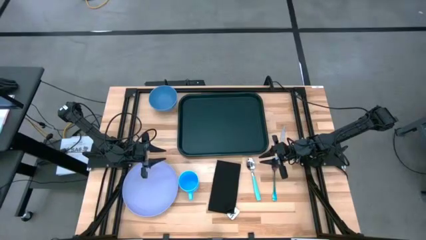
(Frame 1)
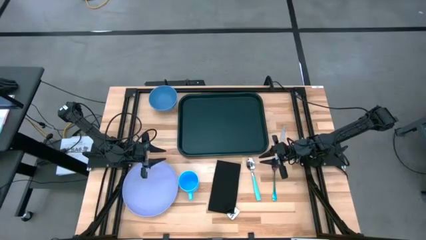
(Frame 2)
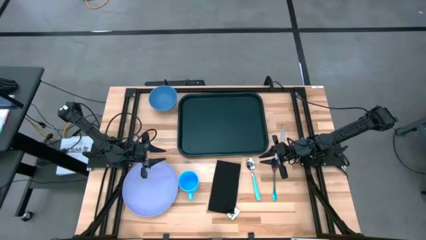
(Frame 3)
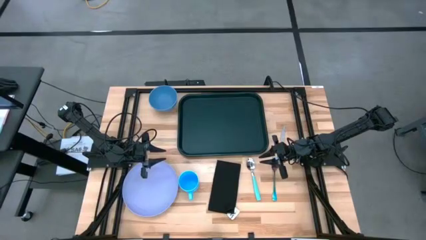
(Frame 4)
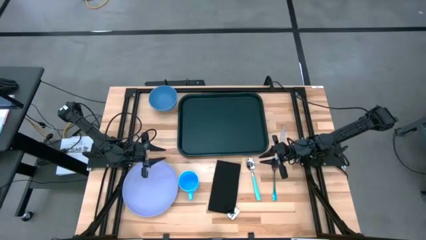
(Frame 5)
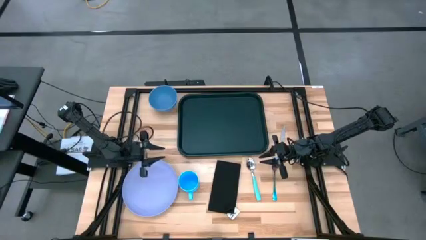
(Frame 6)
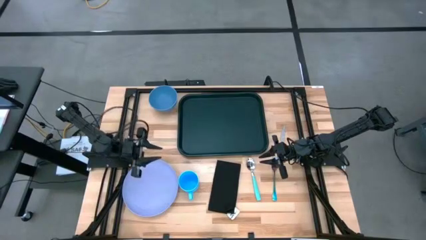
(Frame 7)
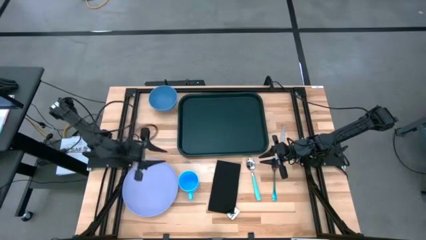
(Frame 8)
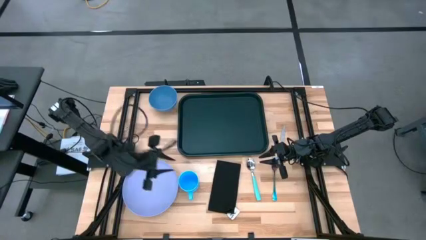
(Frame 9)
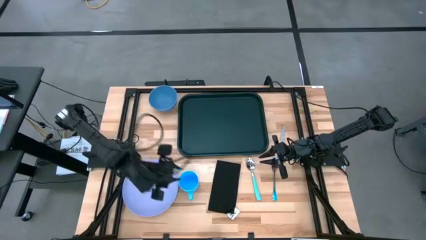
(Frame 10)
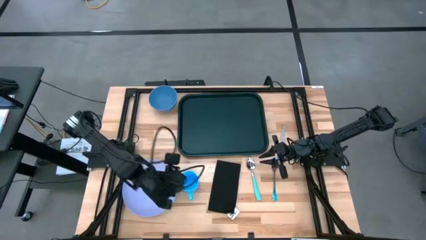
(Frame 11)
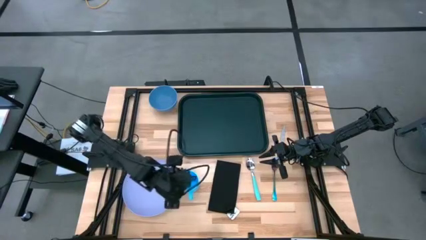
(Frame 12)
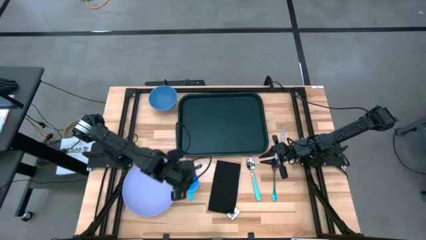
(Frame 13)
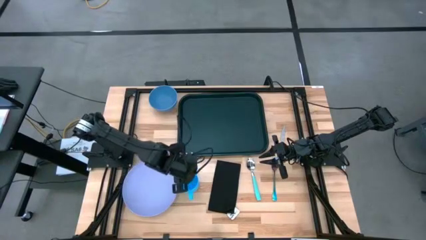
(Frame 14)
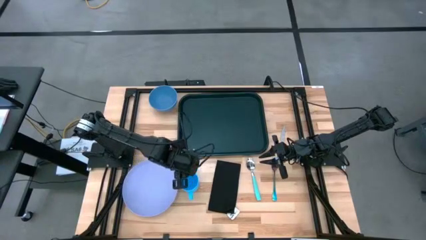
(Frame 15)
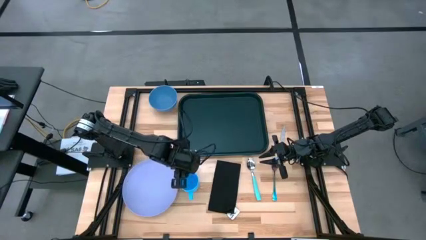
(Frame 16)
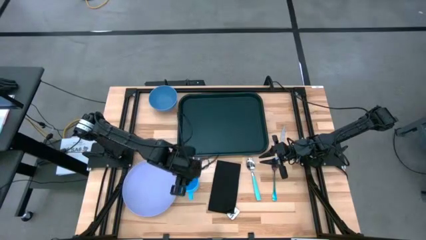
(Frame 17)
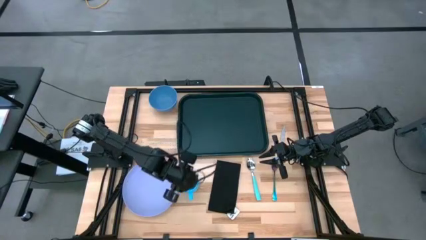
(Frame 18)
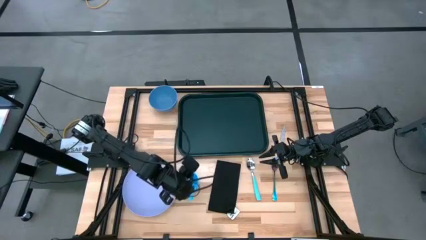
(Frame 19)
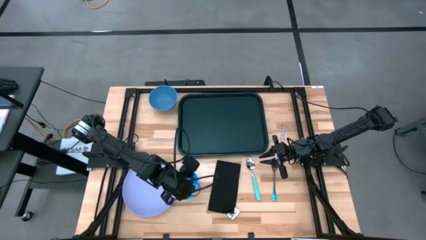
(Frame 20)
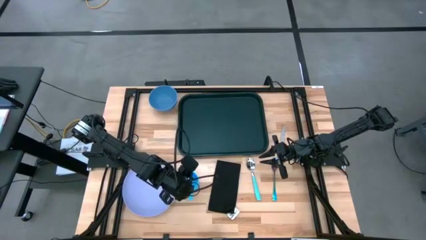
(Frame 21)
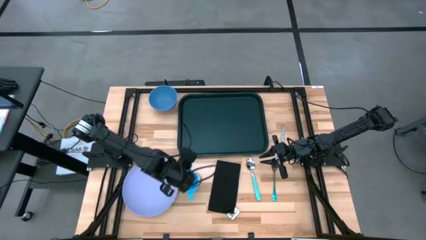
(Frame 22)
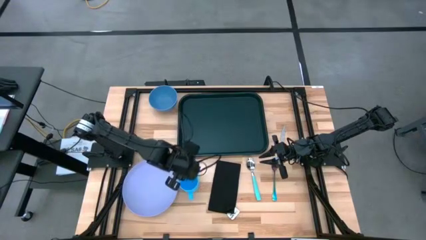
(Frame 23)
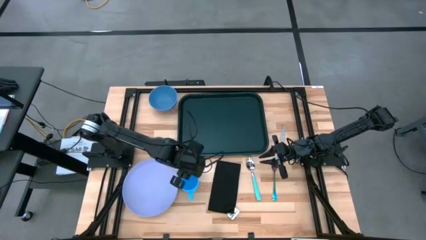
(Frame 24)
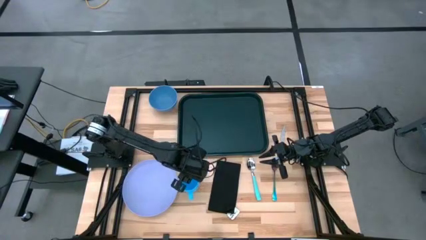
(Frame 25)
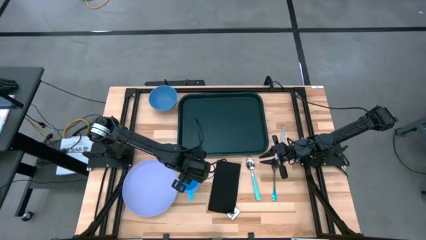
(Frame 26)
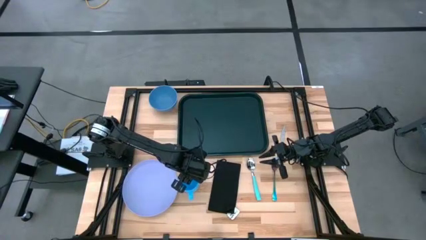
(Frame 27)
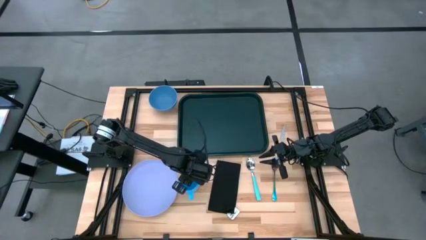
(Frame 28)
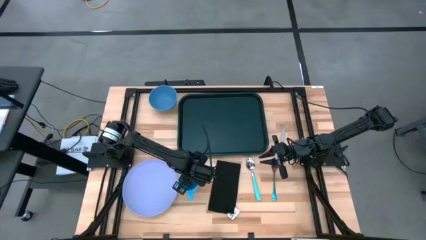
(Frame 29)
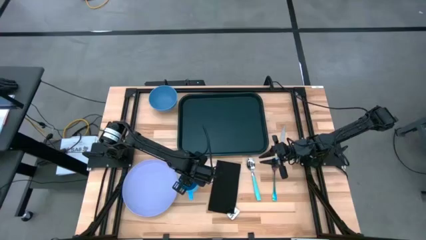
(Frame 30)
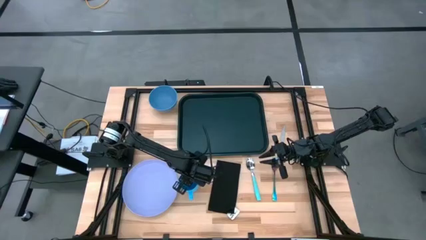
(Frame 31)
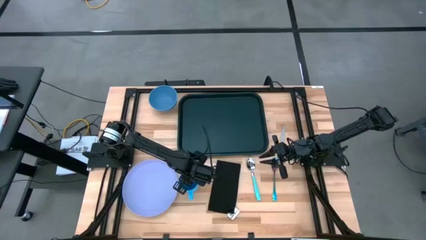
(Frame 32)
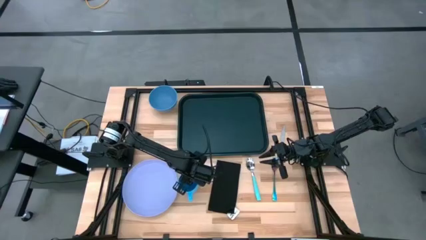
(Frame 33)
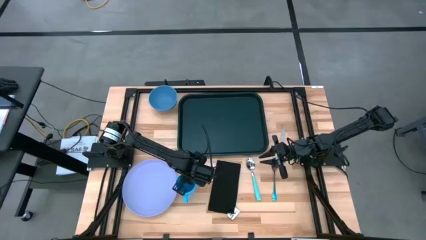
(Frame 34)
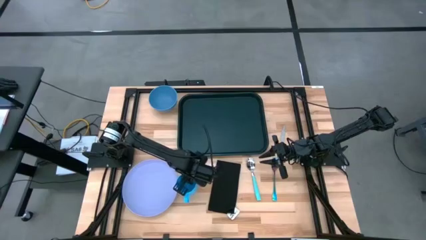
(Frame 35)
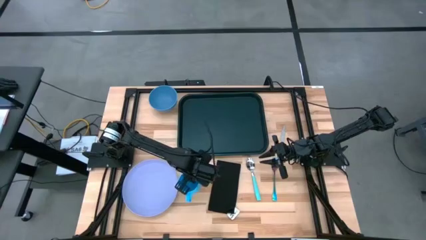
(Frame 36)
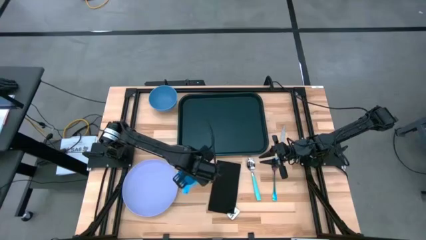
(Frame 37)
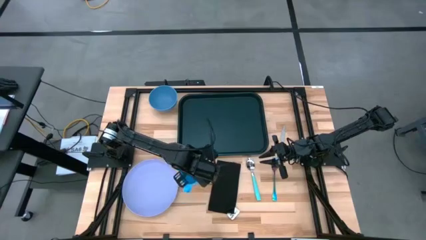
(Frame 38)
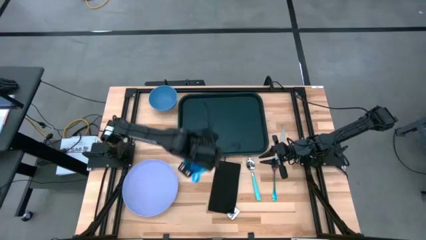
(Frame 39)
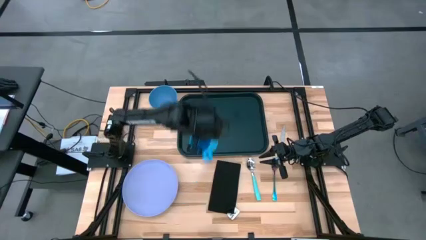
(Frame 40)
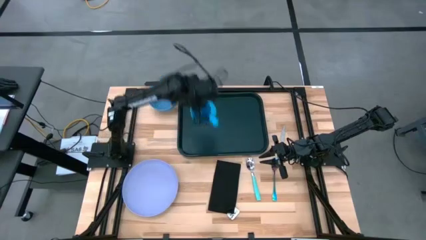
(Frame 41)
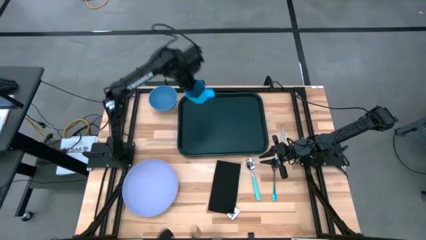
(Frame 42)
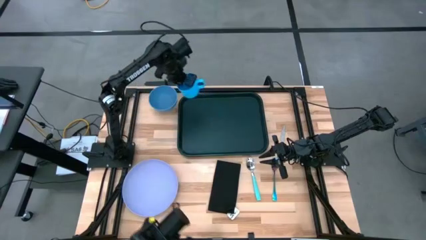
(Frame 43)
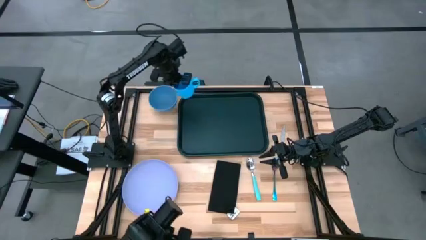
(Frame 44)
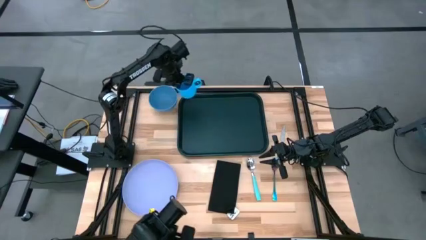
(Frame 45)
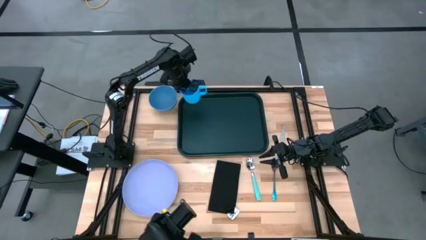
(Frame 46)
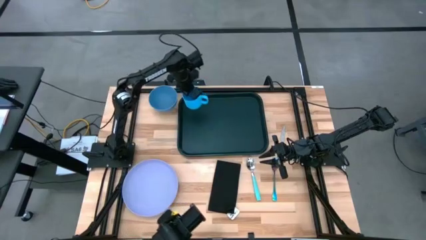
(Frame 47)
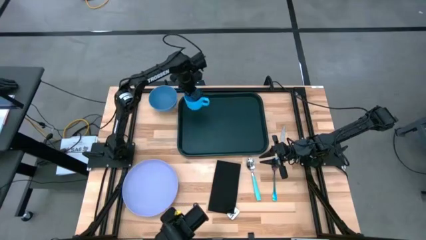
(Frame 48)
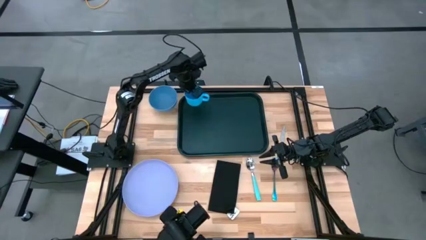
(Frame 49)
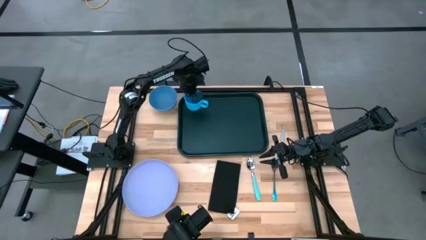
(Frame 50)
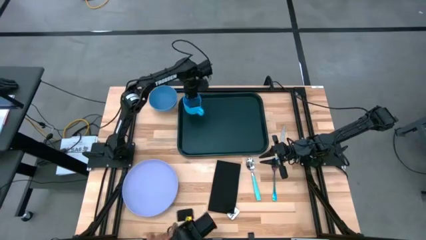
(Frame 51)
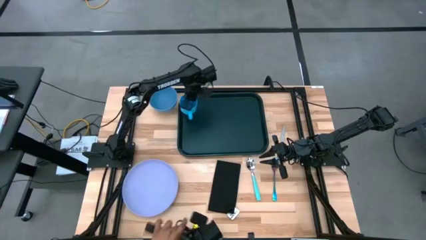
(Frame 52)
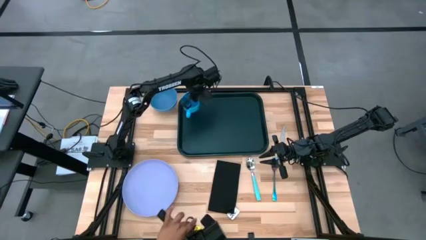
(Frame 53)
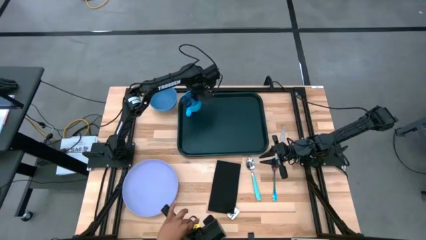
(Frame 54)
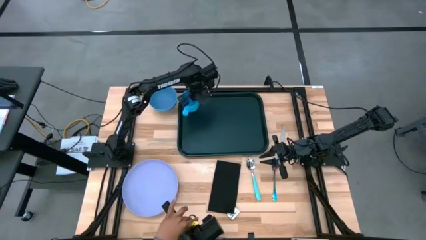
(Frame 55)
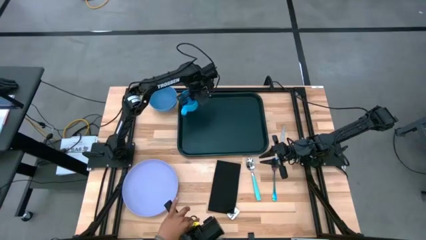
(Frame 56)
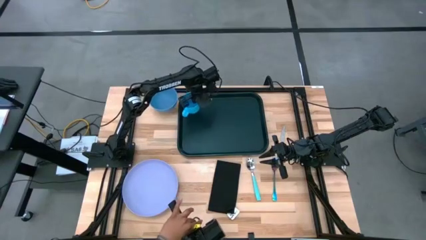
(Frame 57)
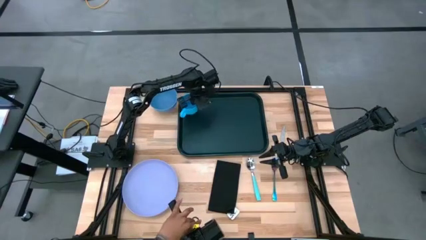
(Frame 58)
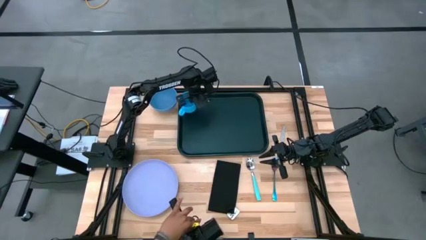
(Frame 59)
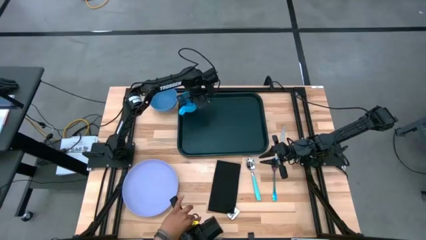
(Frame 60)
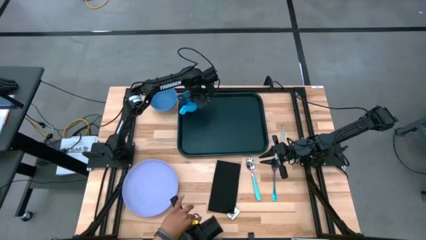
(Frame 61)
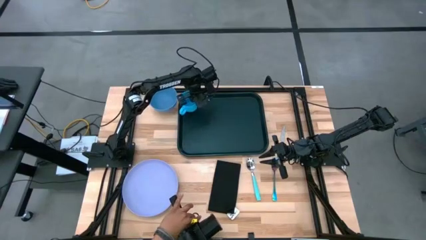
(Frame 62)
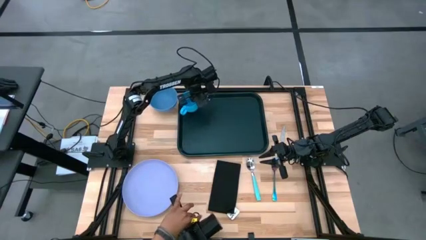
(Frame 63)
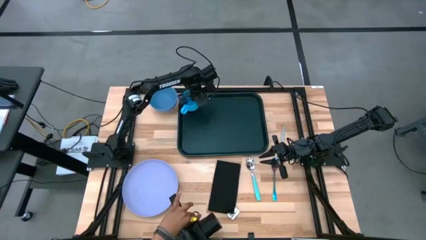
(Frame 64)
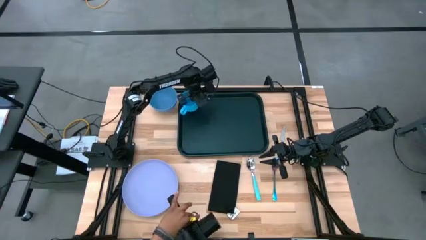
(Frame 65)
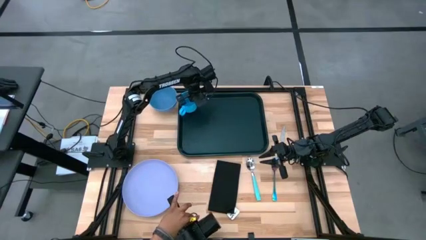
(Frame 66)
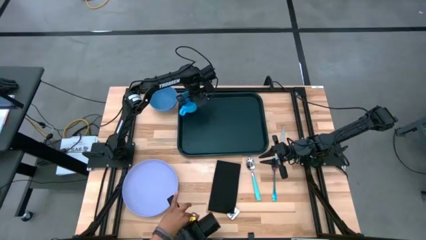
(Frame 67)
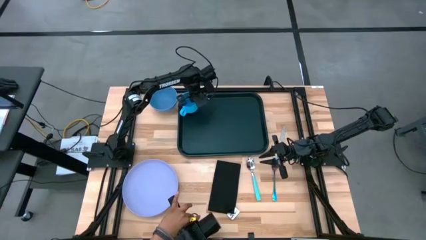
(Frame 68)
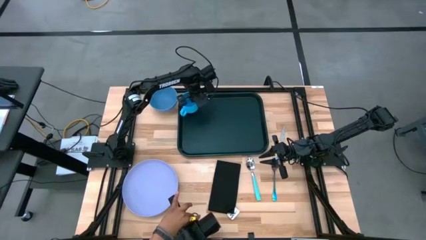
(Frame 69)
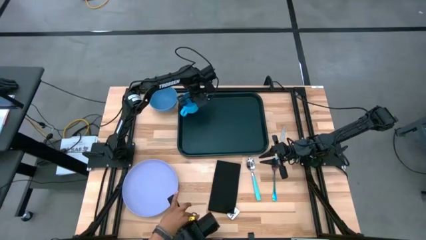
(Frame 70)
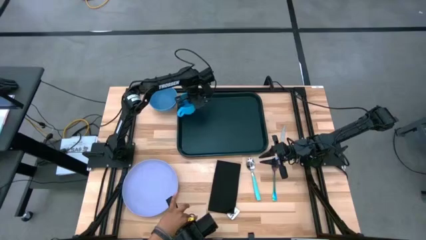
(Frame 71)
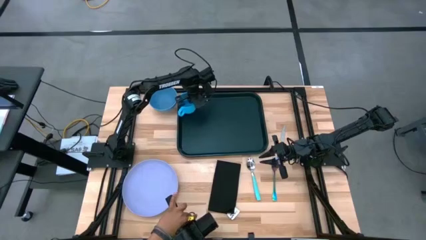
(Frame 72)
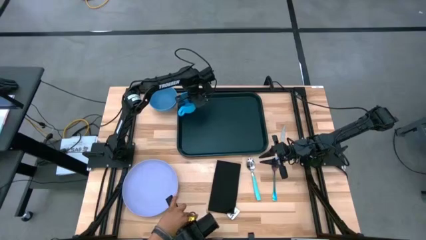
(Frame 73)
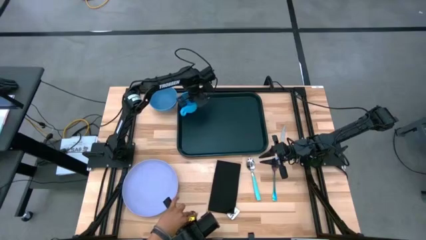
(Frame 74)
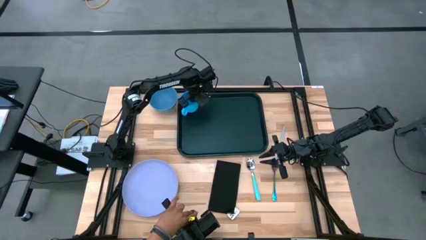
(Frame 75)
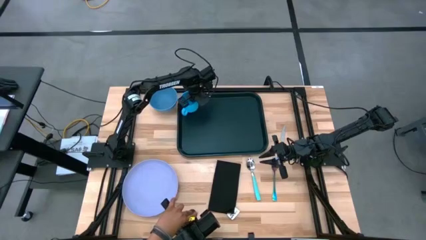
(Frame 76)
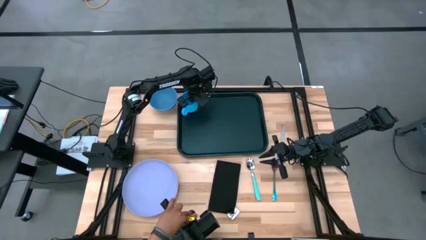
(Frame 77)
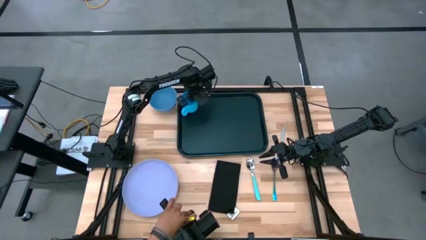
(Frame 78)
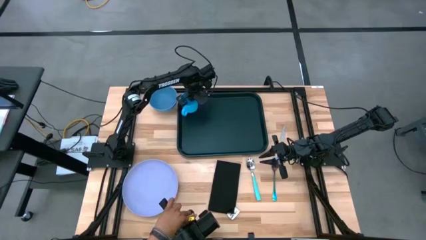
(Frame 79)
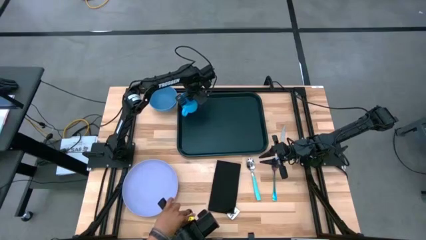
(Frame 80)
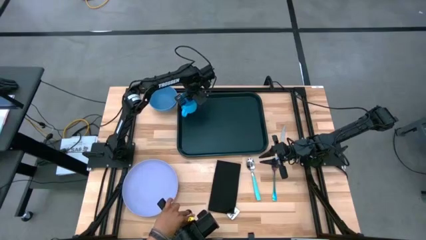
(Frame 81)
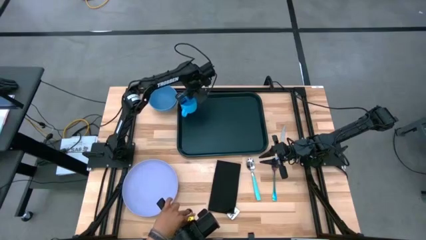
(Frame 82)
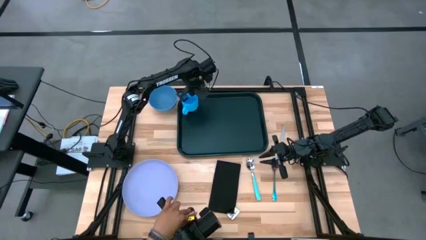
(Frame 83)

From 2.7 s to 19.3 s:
Task: Set up tray
Put the blue mug on the top left of the black serving tray
